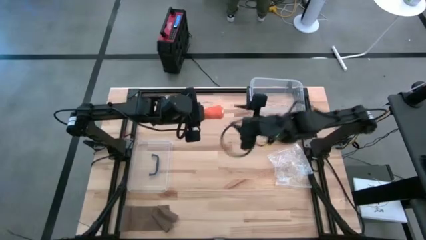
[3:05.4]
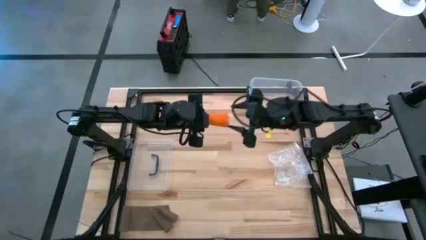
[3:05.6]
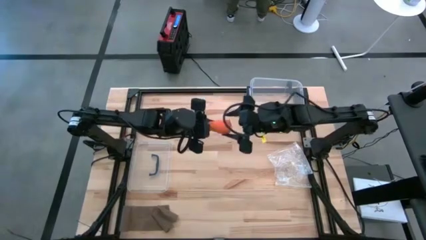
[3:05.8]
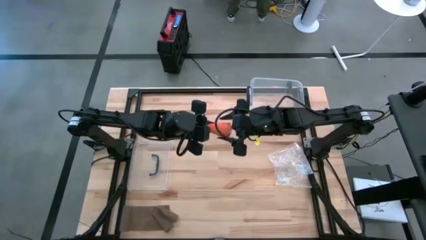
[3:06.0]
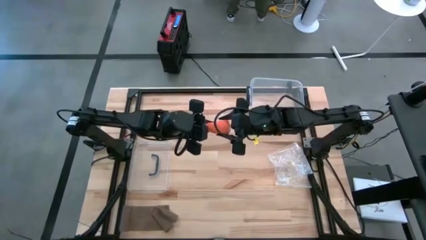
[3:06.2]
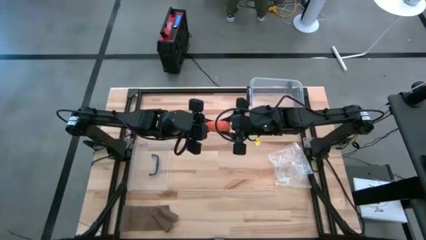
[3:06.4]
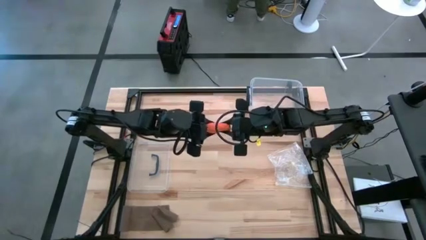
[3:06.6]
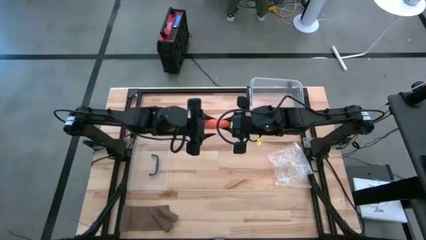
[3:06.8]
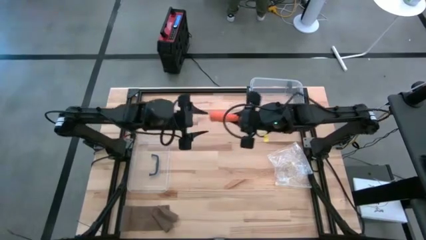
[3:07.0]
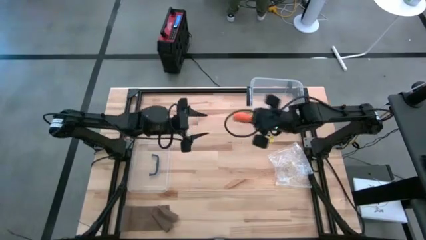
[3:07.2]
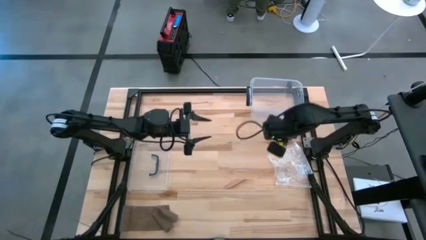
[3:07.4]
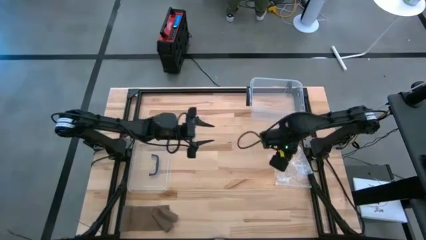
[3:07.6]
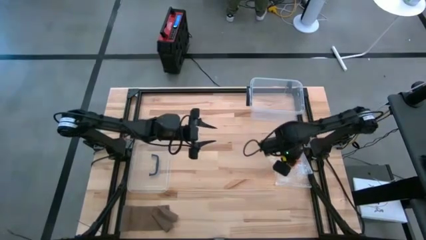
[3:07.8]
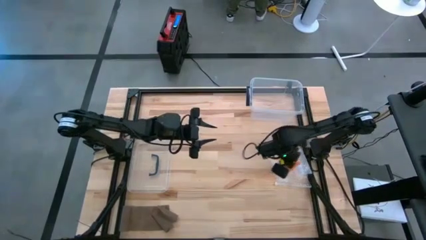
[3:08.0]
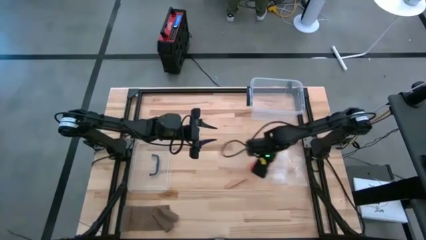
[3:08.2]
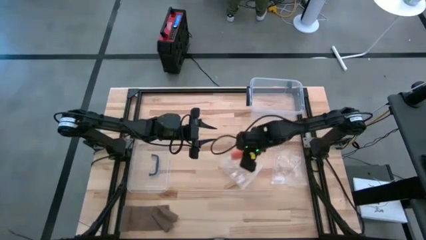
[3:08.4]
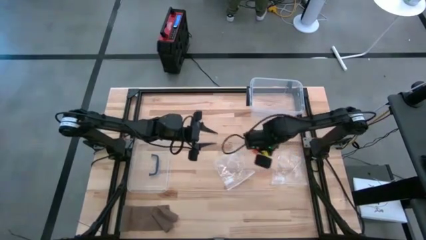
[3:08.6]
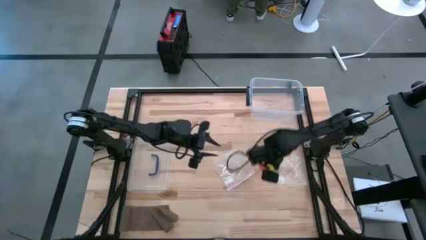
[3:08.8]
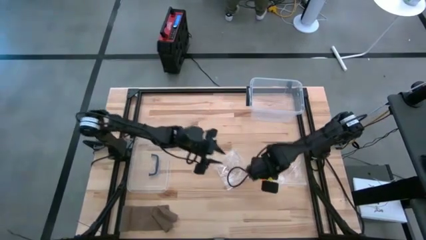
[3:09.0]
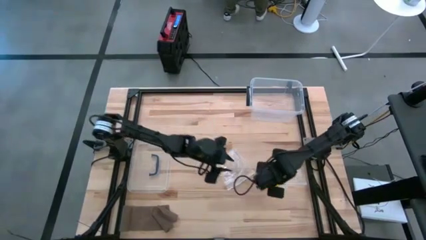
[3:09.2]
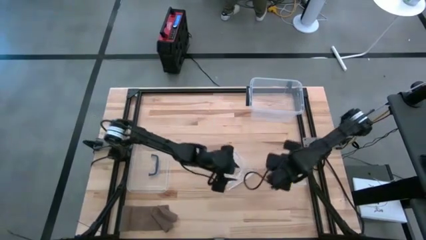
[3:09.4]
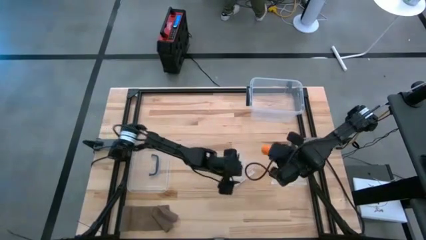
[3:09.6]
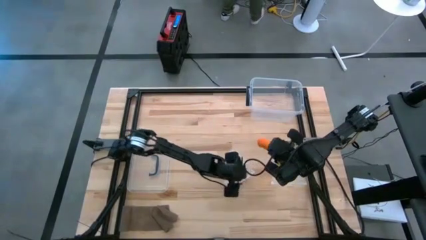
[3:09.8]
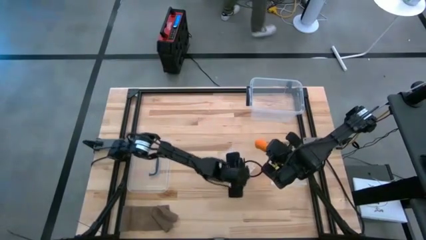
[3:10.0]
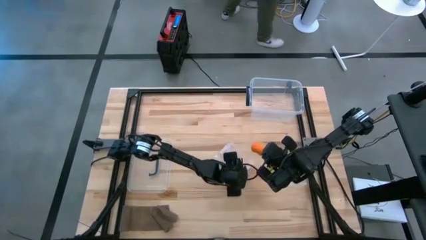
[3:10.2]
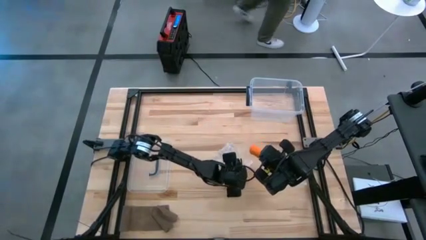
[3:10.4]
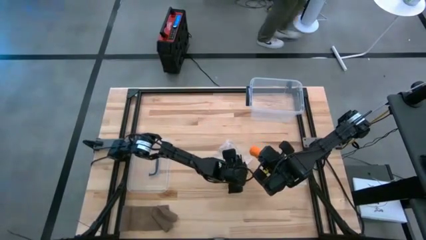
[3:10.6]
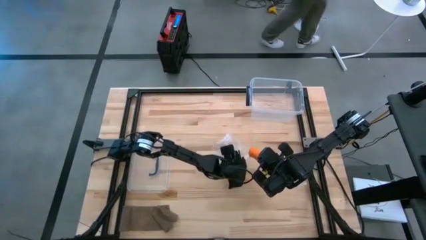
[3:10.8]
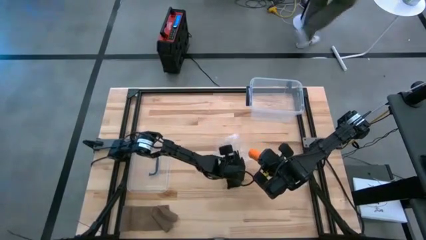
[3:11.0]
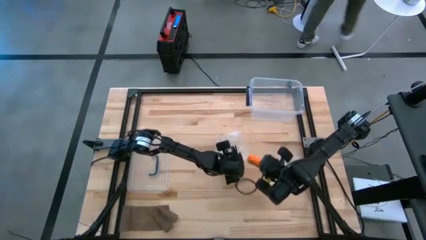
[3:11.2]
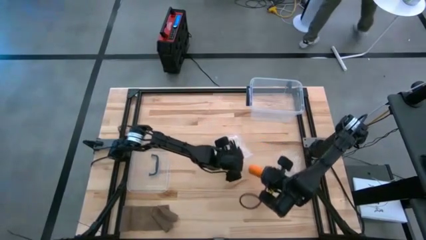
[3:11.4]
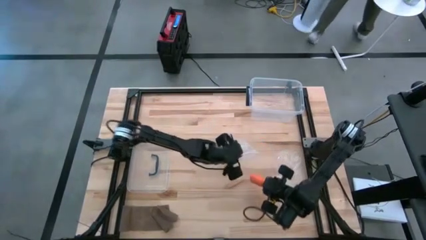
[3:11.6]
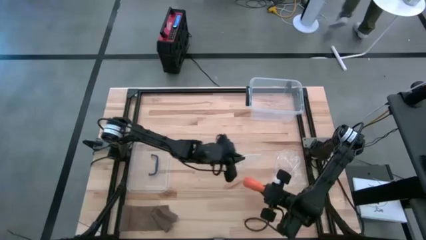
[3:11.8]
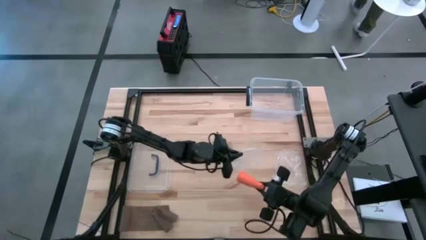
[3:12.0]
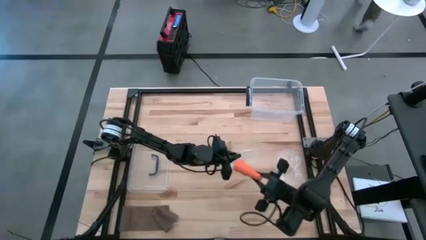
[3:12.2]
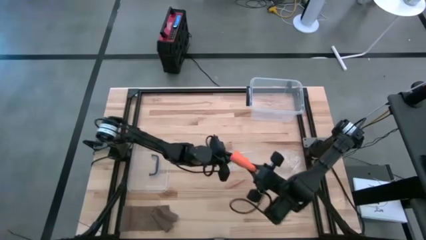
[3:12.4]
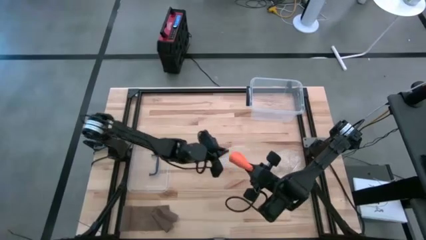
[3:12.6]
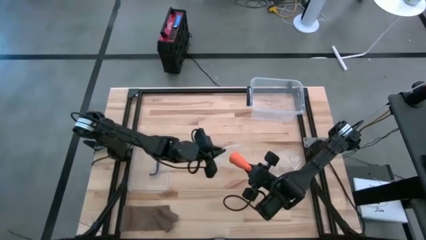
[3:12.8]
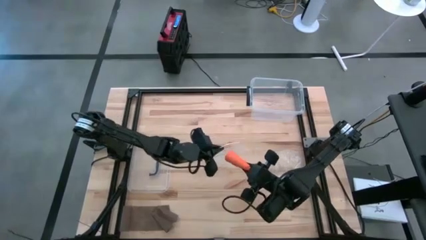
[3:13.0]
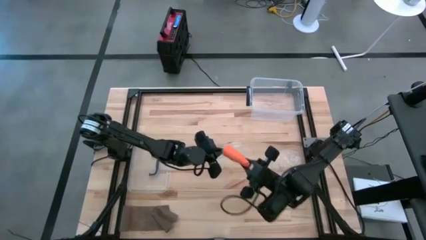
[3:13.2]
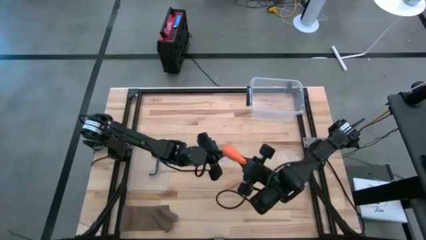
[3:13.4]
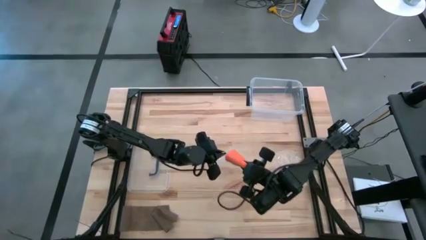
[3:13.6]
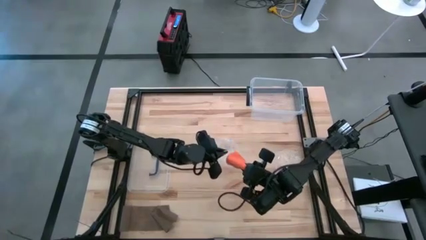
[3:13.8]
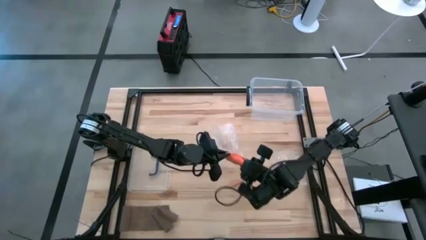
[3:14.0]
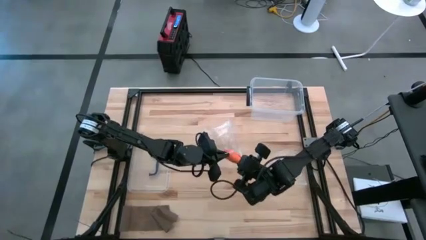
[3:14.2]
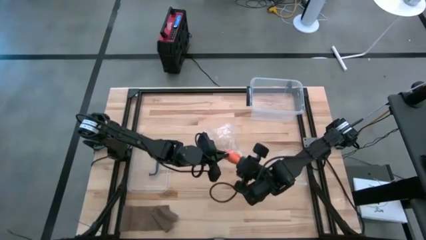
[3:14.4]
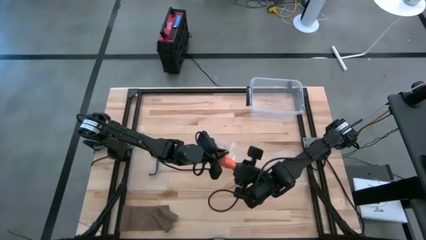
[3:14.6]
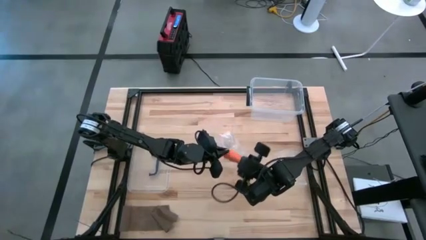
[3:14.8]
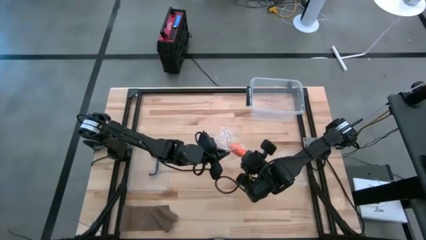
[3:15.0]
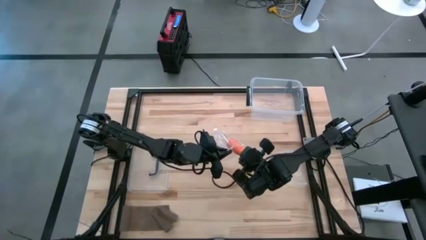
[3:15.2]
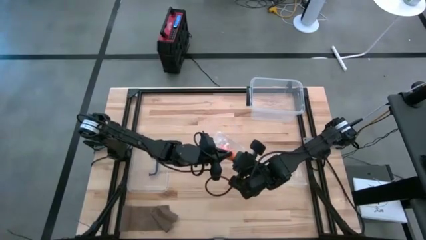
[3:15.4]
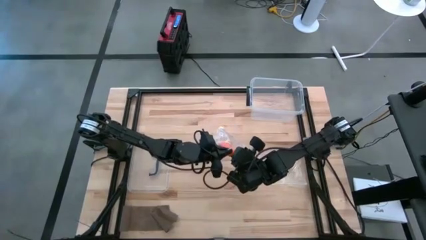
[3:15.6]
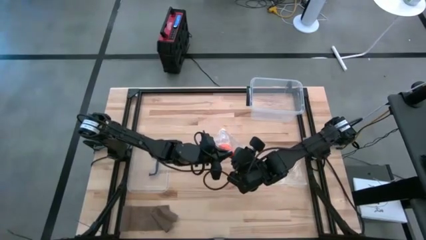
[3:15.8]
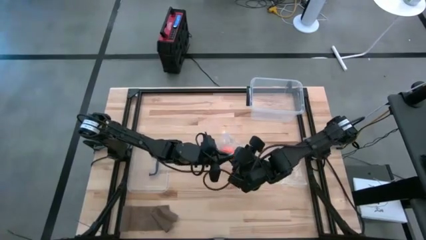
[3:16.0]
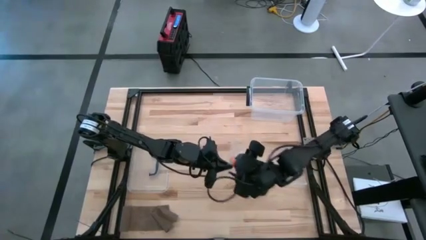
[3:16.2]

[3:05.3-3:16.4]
Task: Roll bandage
Put the rolled orange bandage into the transparent zip bag

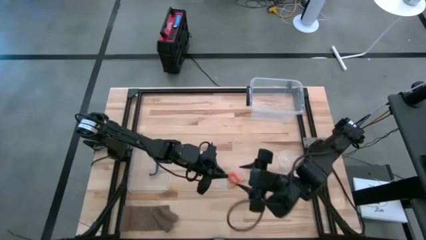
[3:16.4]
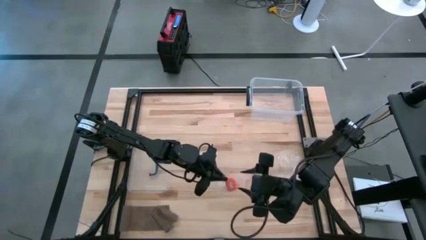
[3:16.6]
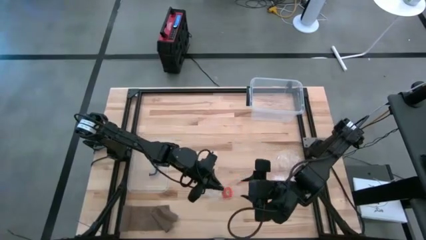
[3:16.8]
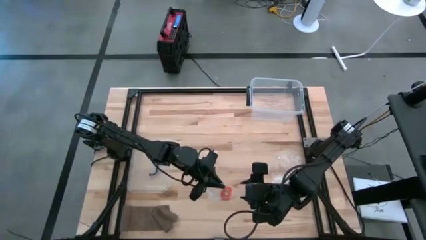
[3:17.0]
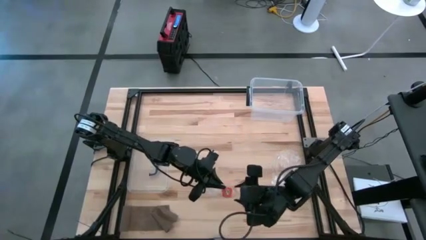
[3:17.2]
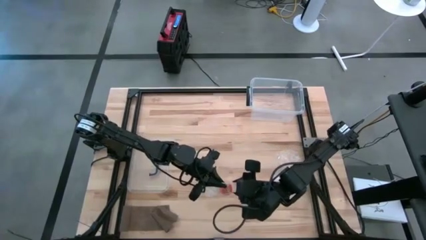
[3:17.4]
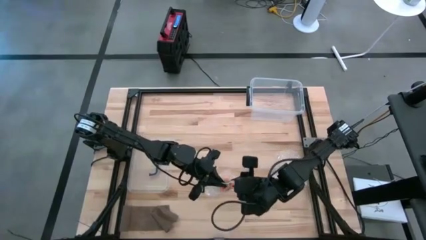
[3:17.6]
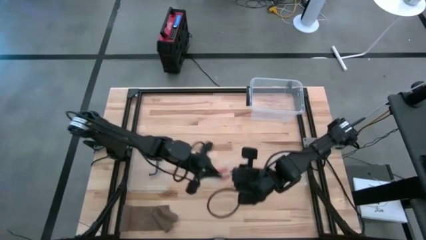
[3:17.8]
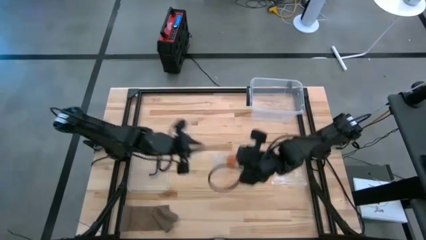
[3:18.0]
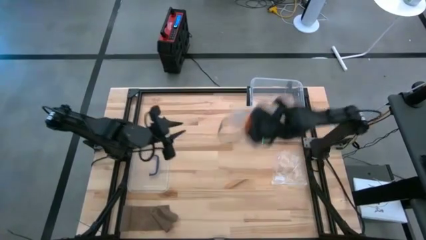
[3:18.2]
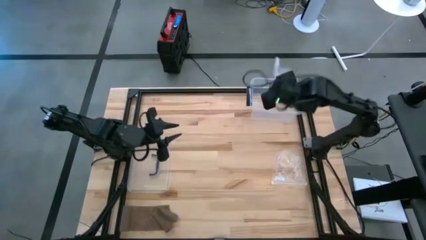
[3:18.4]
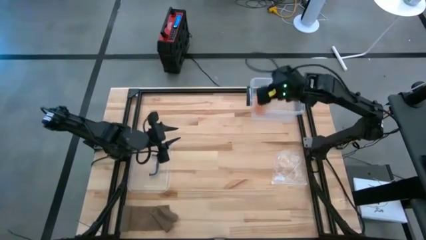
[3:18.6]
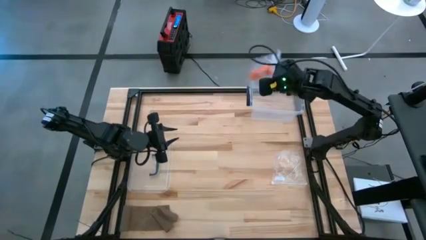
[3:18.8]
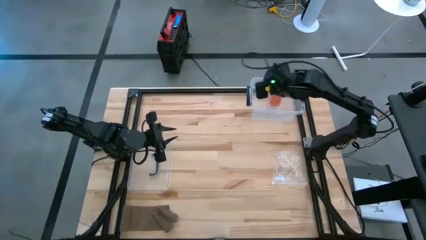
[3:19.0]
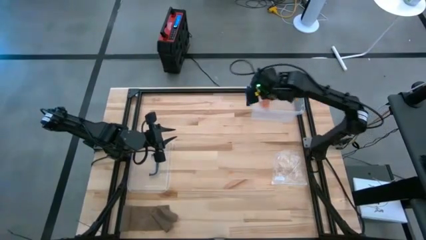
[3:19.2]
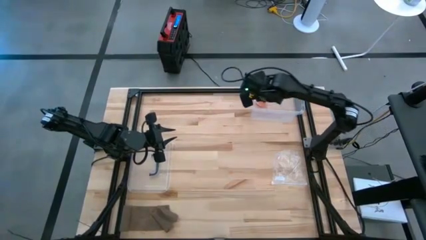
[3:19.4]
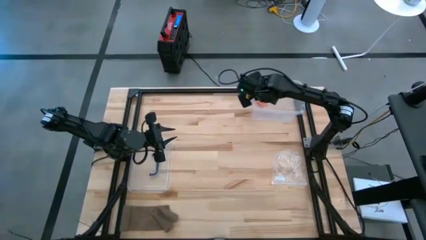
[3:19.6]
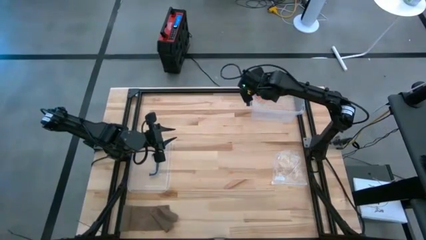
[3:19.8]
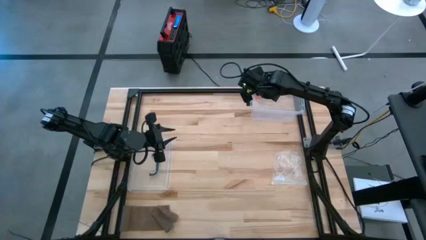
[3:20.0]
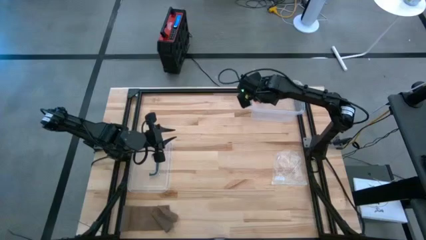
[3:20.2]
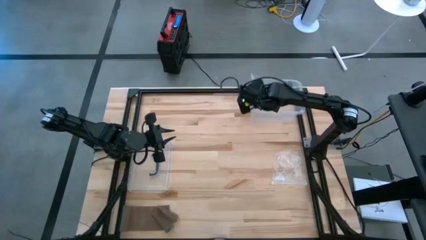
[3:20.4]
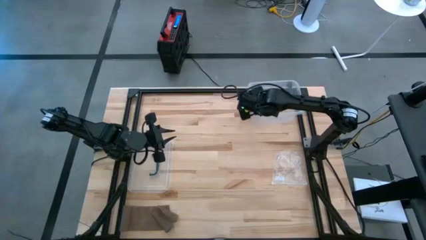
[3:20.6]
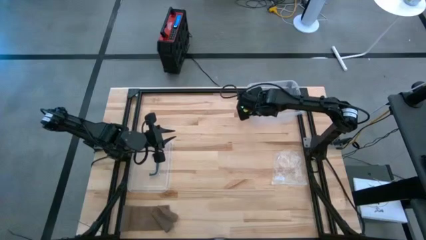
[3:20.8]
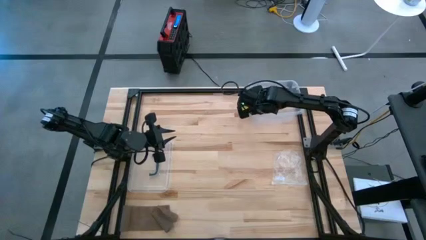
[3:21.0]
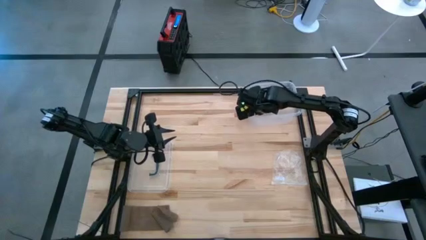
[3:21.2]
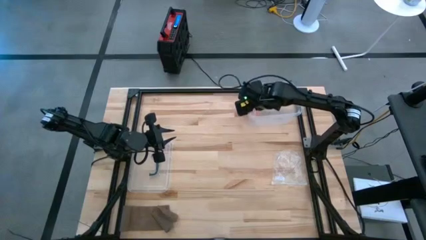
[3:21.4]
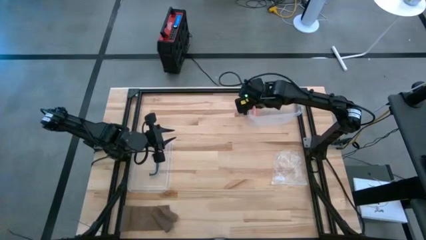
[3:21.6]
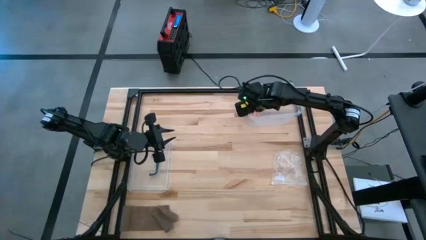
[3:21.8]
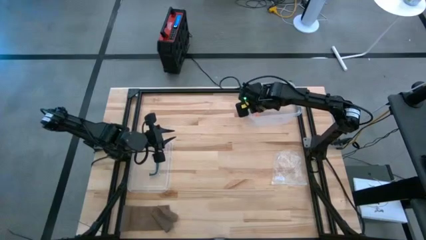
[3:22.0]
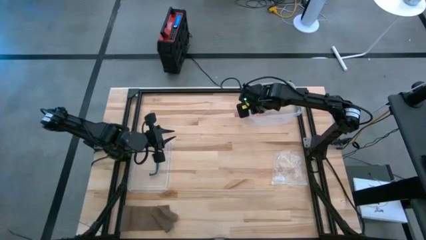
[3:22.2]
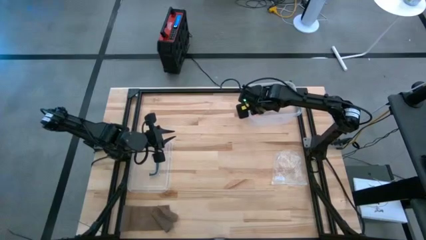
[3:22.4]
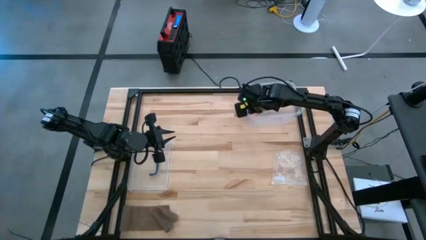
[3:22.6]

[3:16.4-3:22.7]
Put the packed rolled orange bandage into the transparent container
